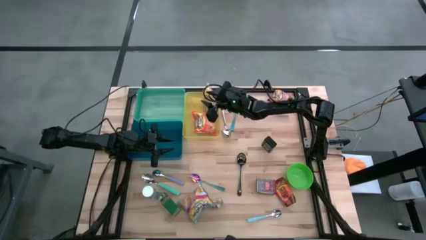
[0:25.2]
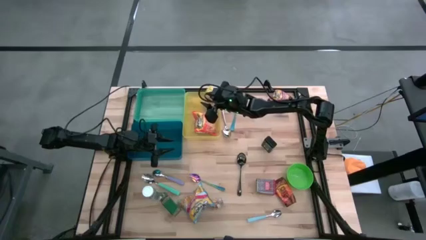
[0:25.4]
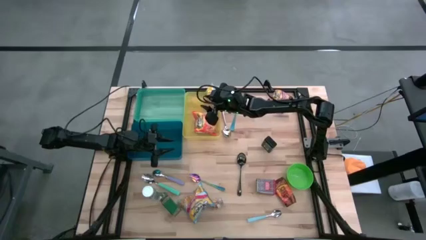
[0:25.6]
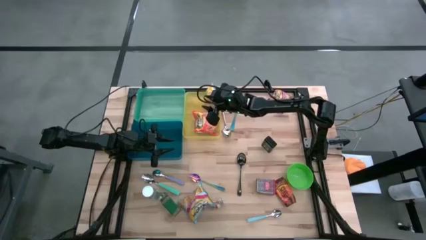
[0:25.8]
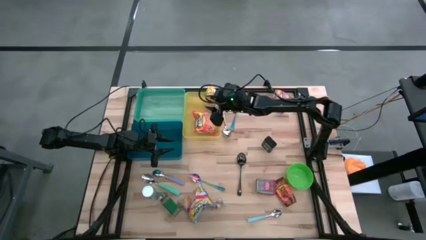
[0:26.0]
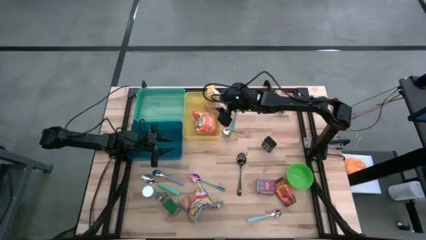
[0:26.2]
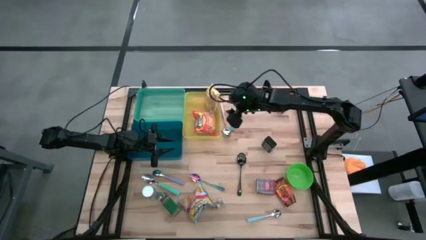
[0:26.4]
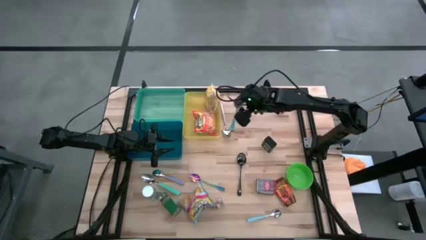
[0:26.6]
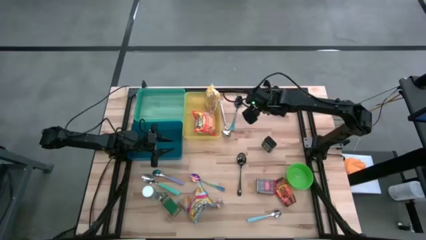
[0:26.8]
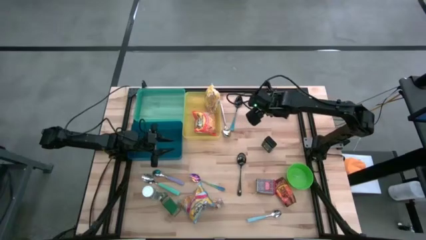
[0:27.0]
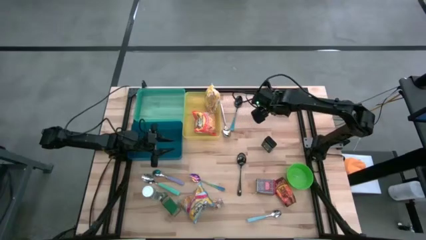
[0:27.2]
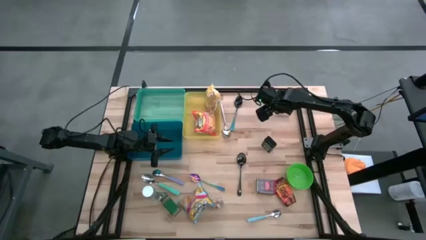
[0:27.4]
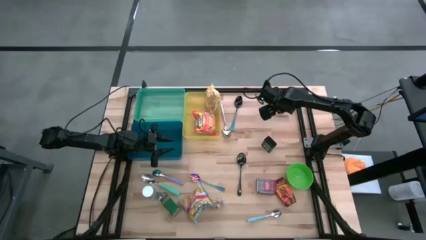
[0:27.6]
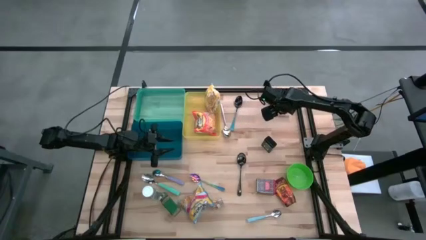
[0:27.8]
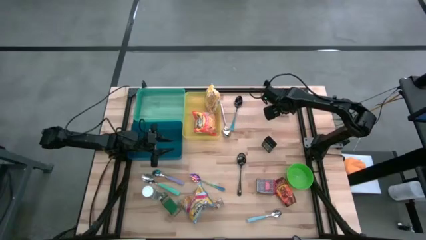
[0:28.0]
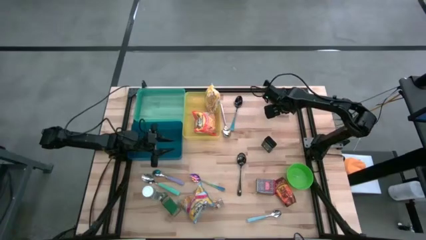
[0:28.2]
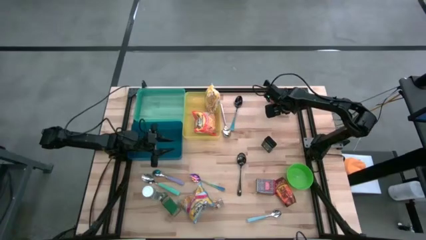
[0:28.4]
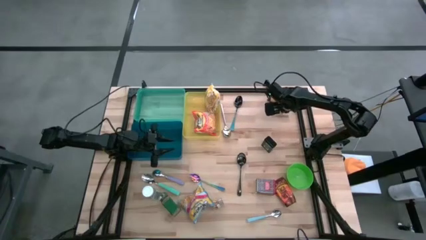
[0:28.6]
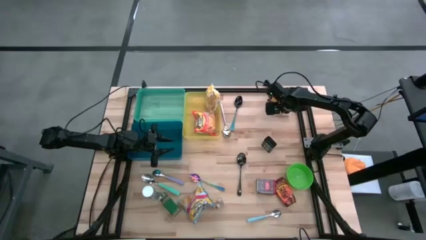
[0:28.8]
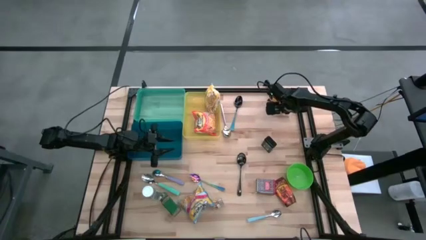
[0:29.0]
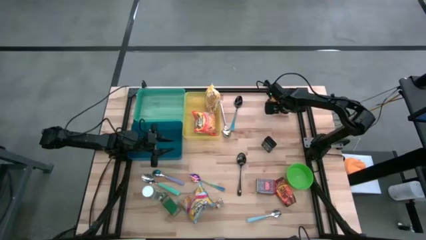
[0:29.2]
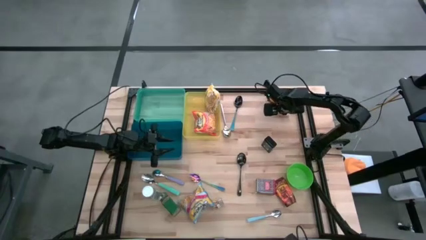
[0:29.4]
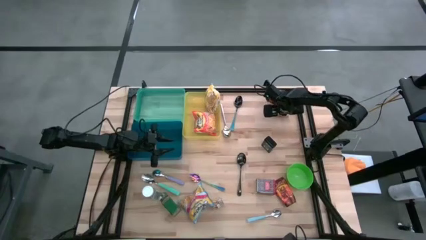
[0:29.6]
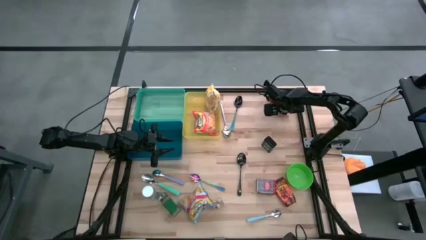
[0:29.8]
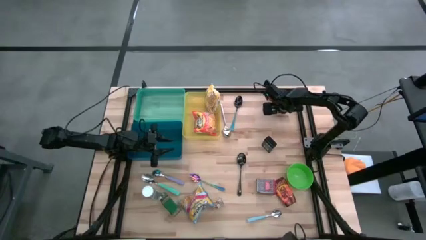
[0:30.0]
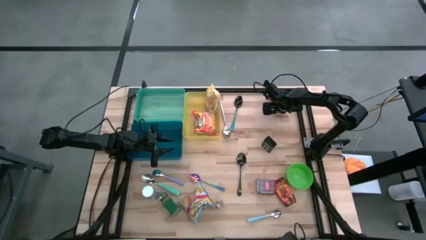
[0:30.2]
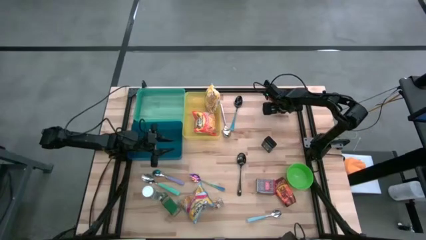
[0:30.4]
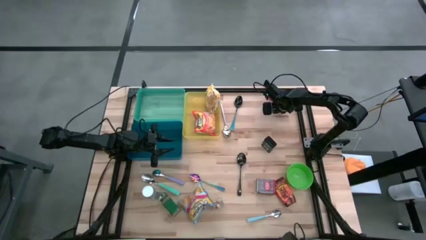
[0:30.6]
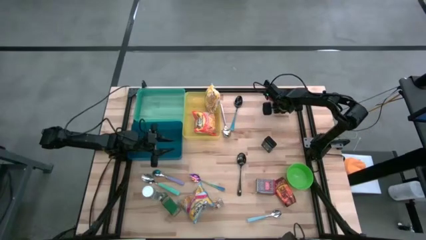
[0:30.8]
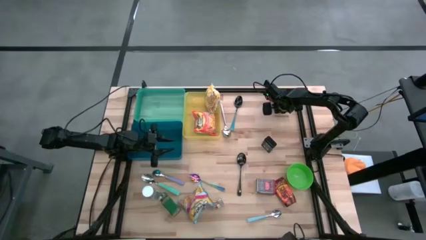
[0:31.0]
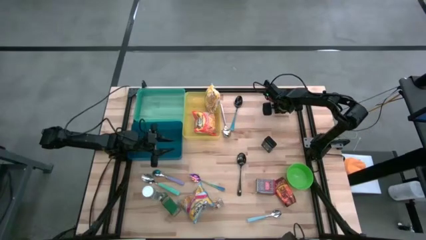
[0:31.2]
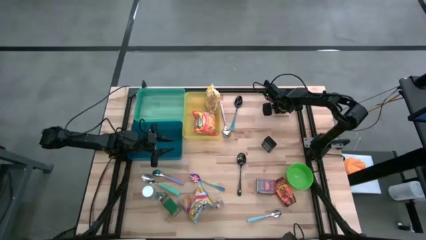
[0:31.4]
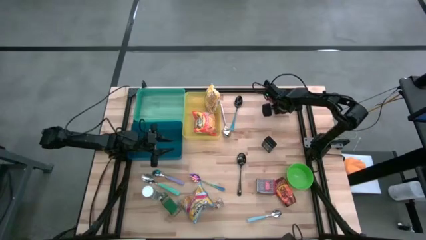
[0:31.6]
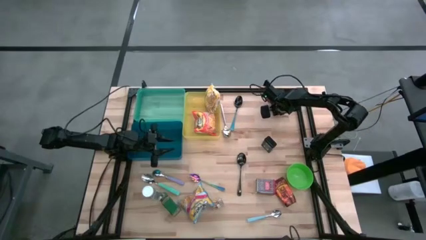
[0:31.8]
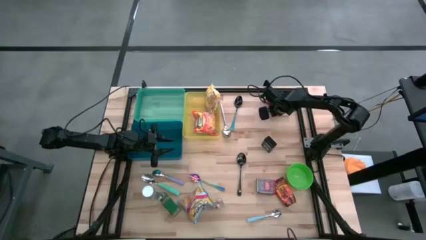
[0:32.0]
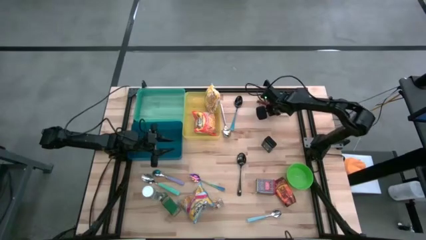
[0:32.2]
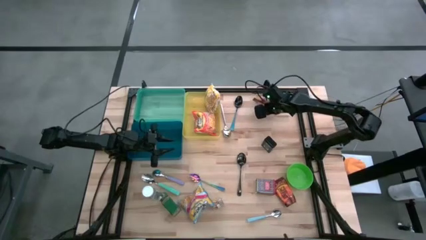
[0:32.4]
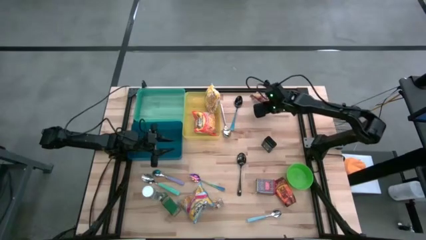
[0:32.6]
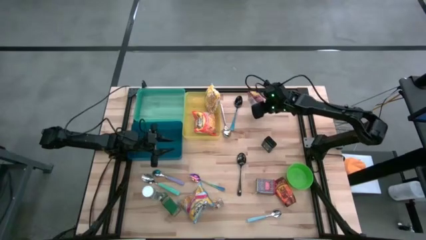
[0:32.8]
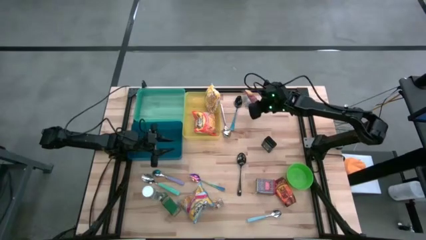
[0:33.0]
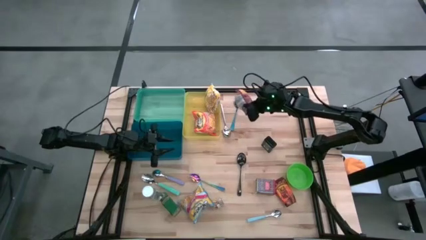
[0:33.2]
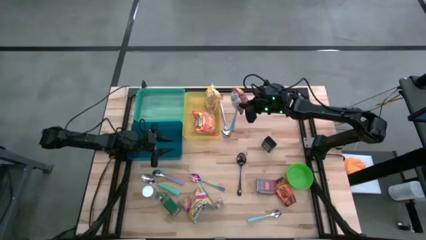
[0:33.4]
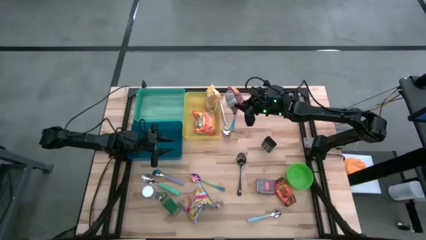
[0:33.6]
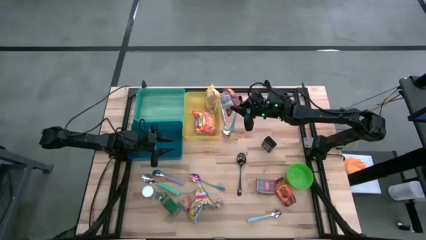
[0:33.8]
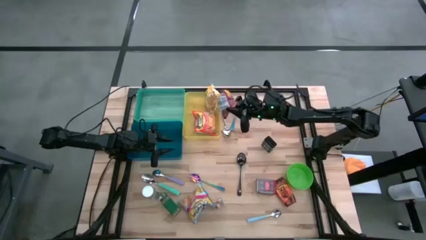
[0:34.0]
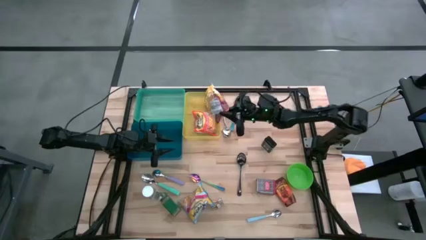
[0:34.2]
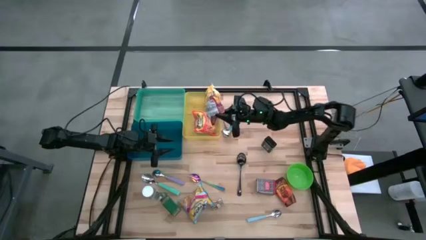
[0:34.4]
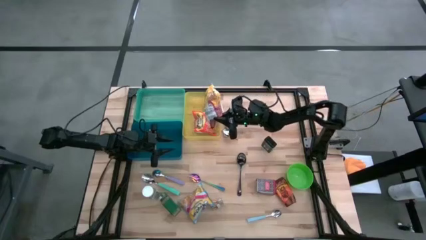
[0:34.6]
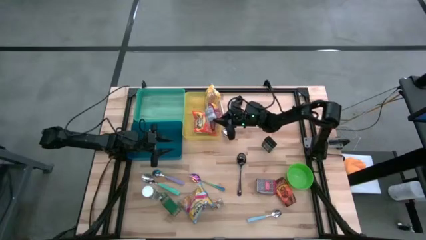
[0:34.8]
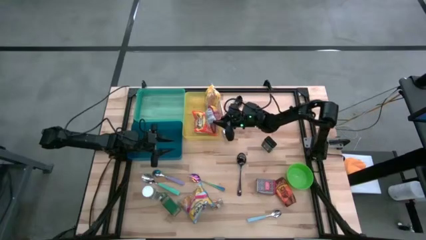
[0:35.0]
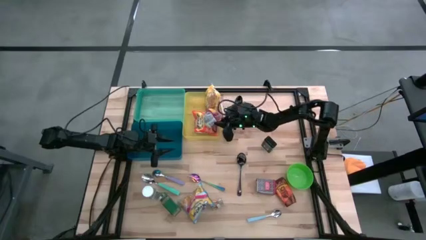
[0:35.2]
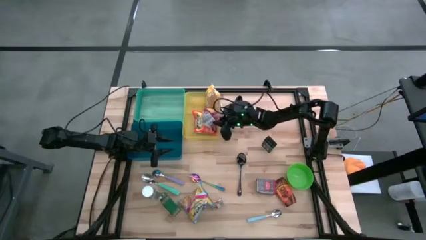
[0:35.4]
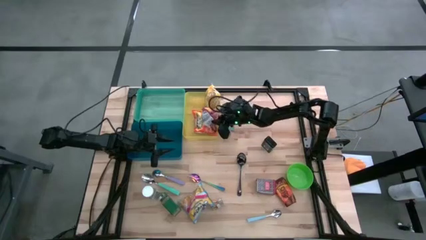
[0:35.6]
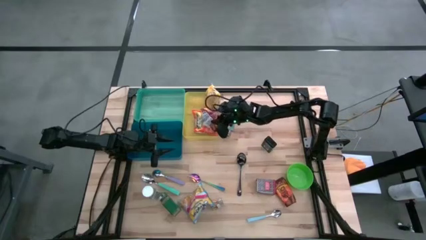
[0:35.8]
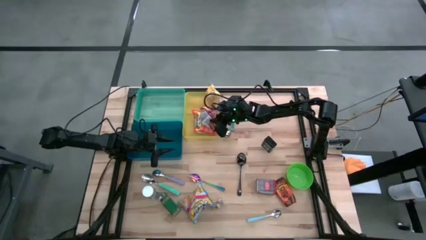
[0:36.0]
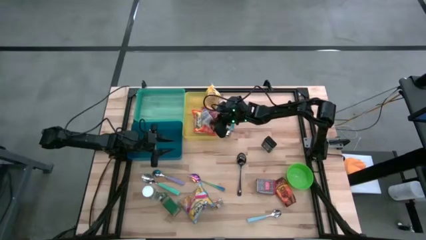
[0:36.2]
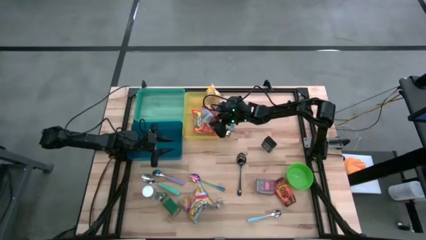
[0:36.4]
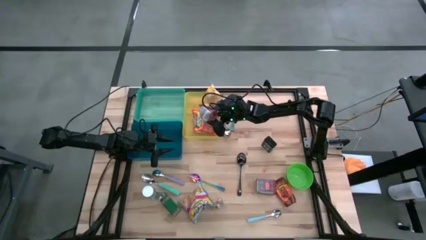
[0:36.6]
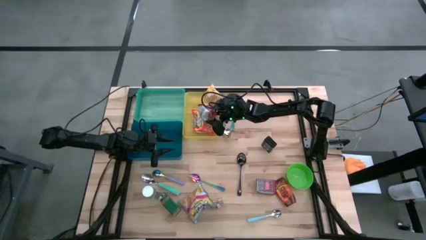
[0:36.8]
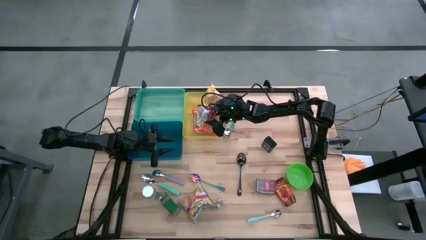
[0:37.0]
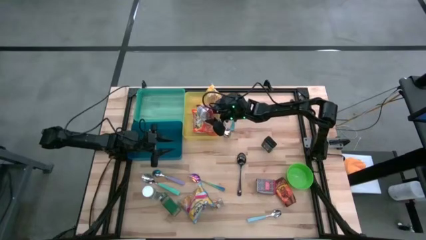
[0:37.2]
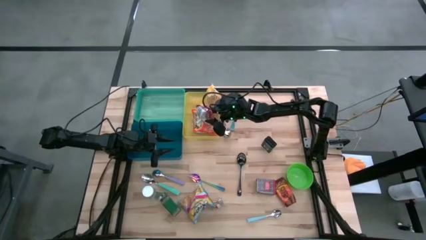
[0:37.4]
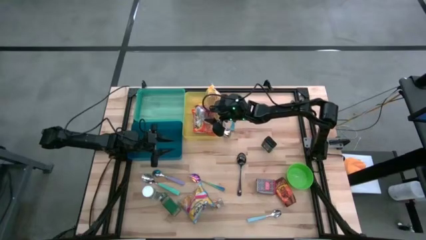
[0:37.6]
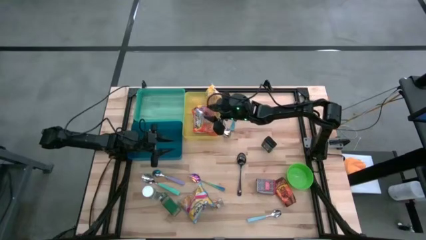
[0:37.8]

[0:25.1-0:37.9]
Put the red noodle pack into the yellow bin
